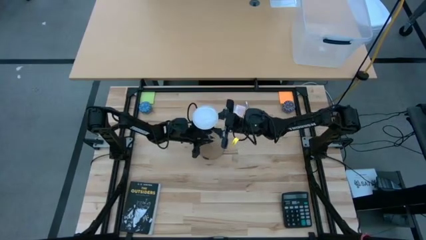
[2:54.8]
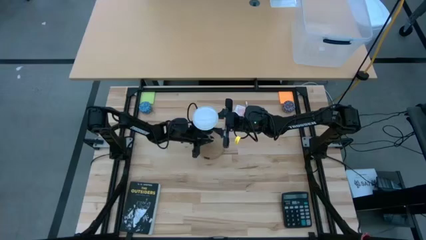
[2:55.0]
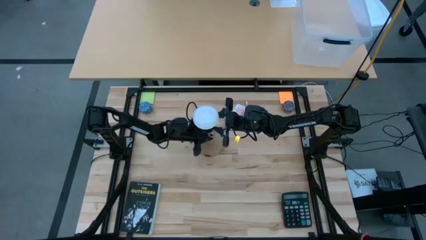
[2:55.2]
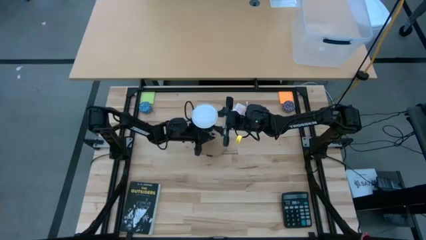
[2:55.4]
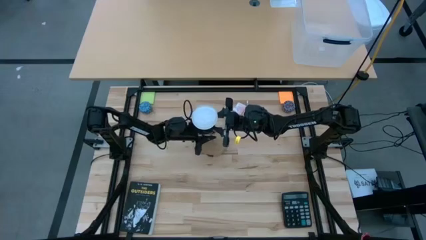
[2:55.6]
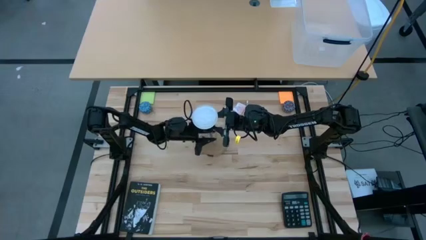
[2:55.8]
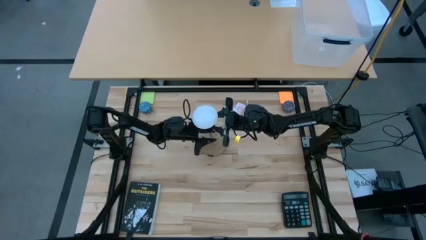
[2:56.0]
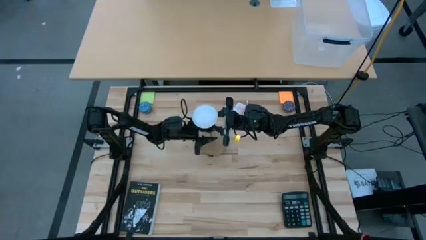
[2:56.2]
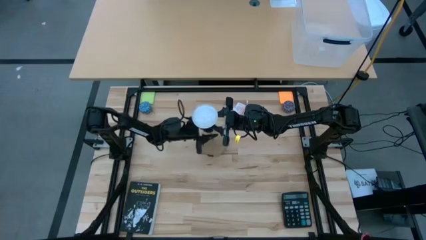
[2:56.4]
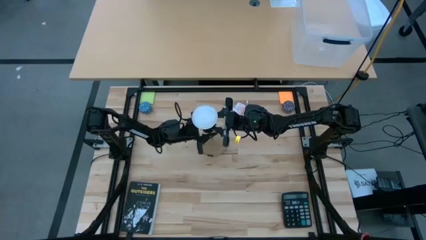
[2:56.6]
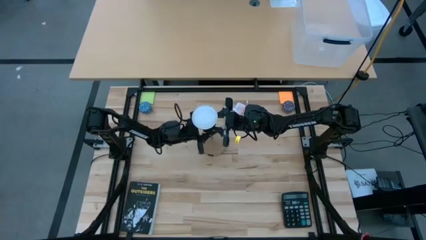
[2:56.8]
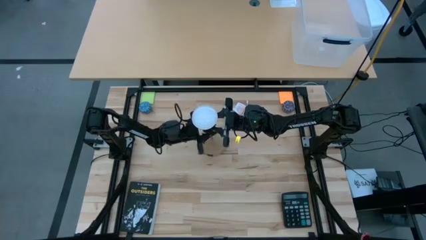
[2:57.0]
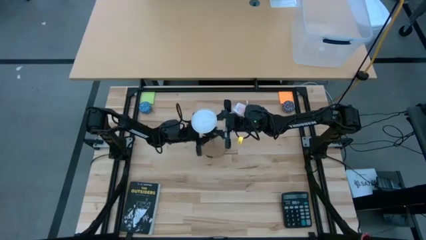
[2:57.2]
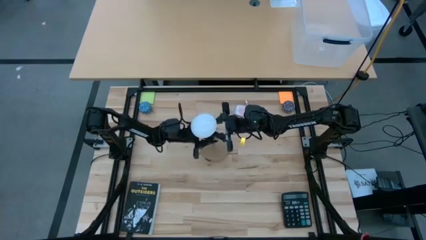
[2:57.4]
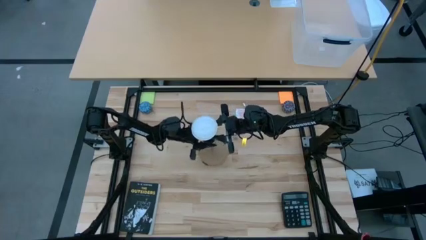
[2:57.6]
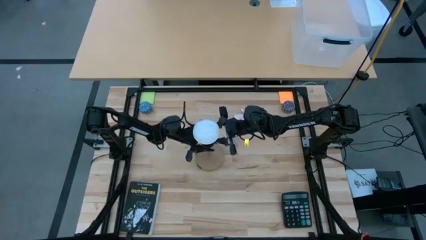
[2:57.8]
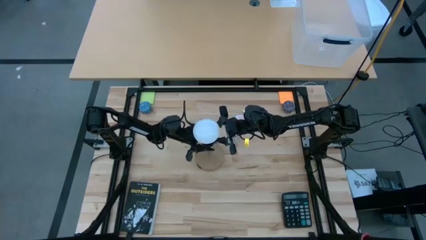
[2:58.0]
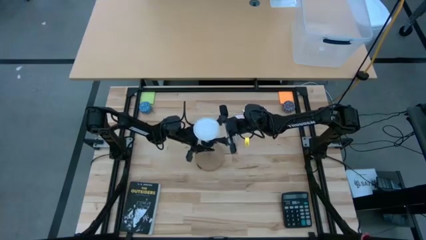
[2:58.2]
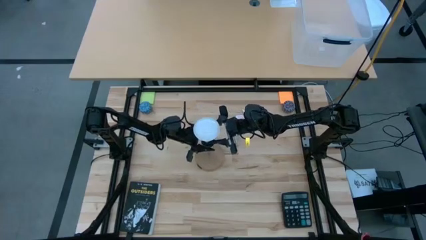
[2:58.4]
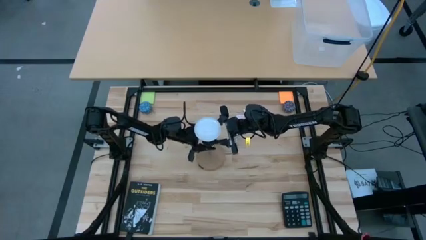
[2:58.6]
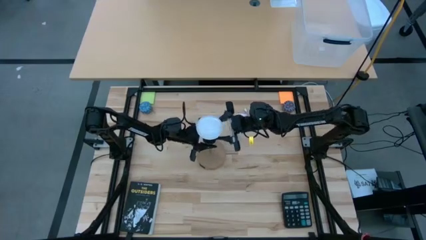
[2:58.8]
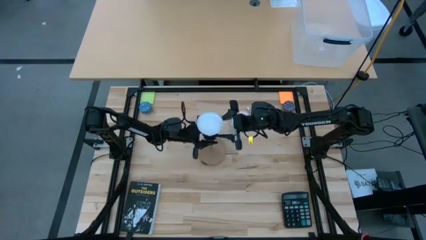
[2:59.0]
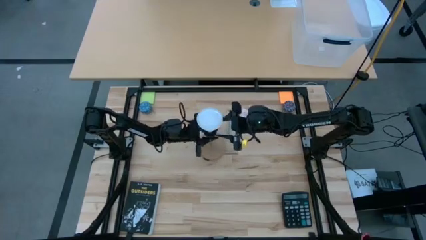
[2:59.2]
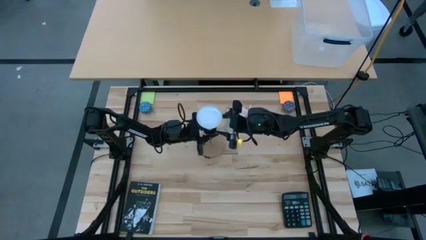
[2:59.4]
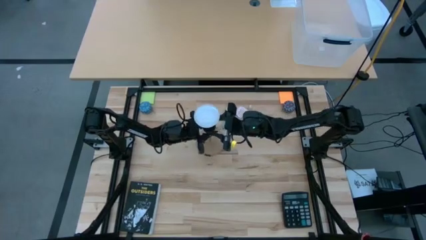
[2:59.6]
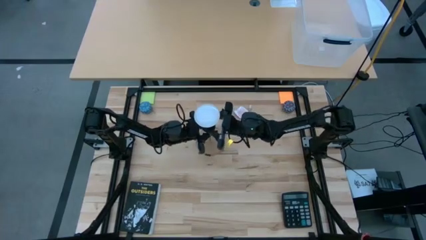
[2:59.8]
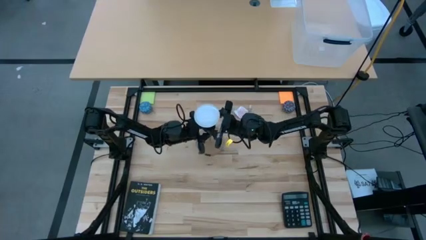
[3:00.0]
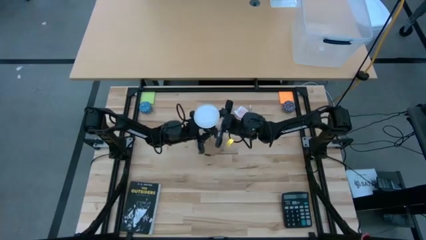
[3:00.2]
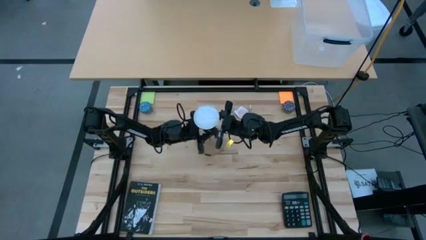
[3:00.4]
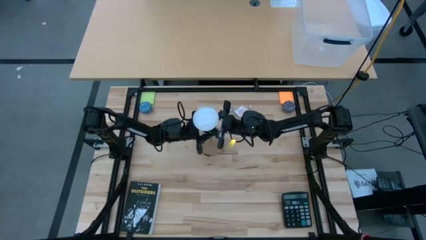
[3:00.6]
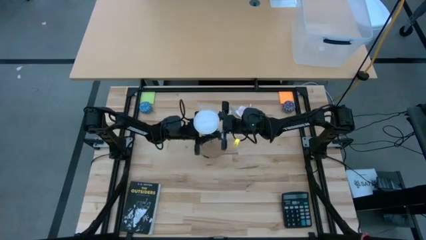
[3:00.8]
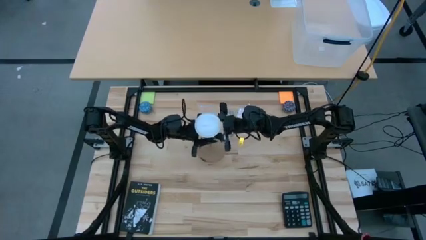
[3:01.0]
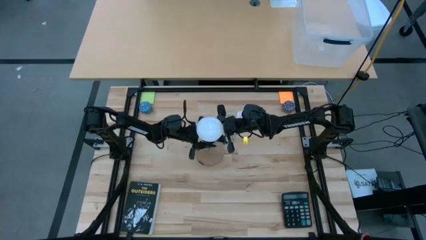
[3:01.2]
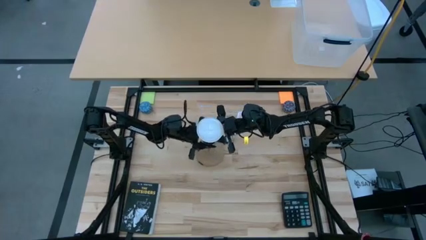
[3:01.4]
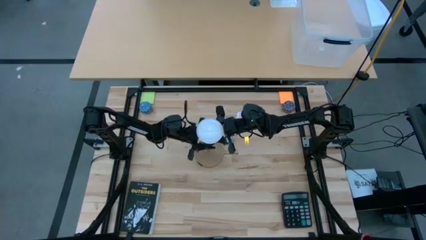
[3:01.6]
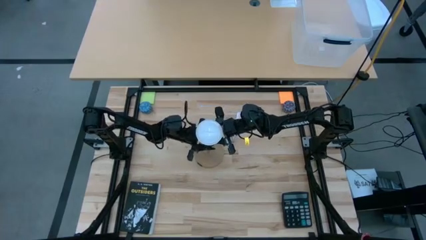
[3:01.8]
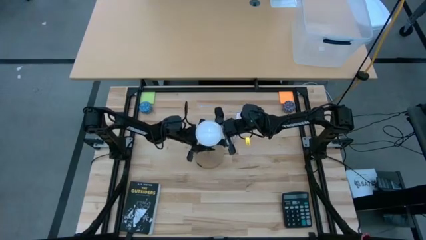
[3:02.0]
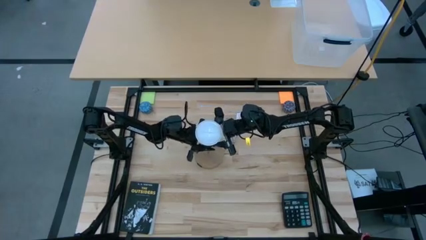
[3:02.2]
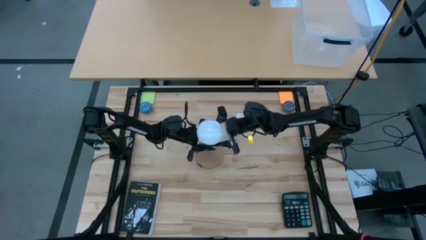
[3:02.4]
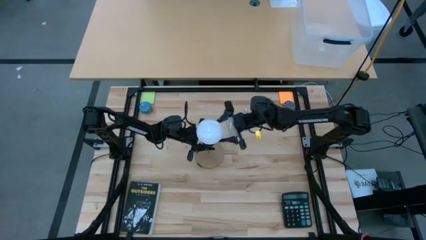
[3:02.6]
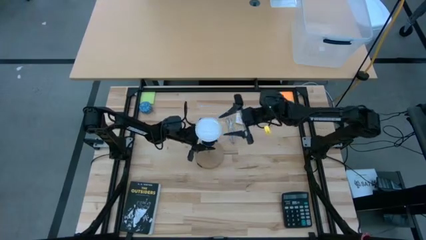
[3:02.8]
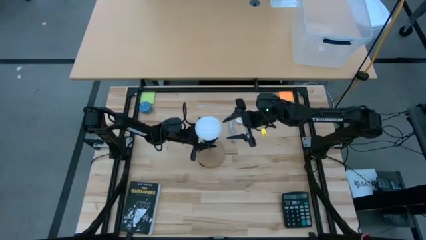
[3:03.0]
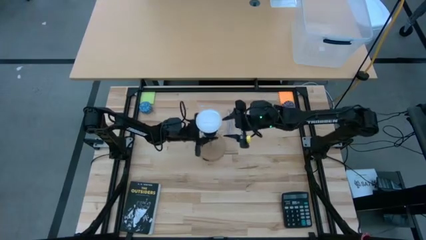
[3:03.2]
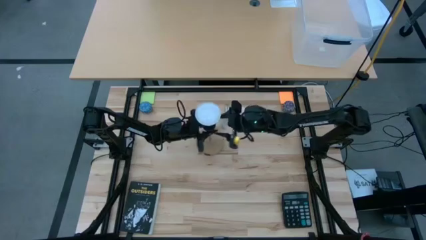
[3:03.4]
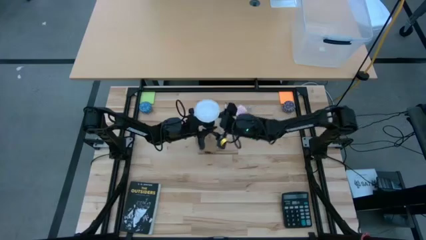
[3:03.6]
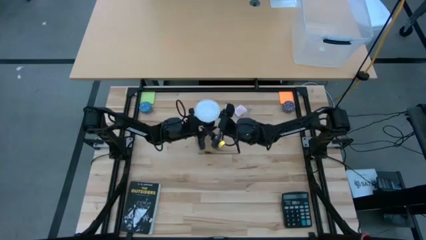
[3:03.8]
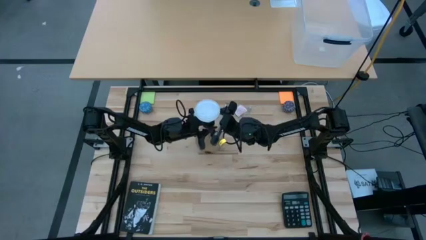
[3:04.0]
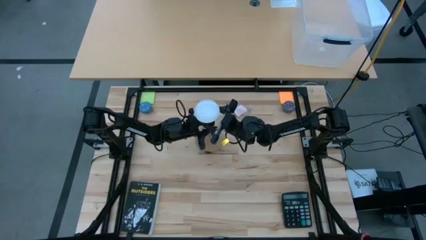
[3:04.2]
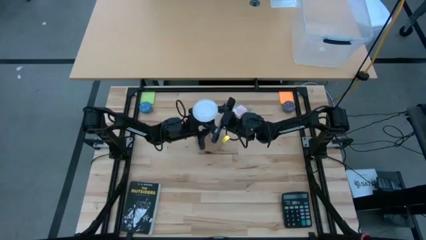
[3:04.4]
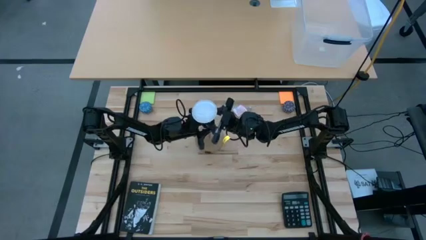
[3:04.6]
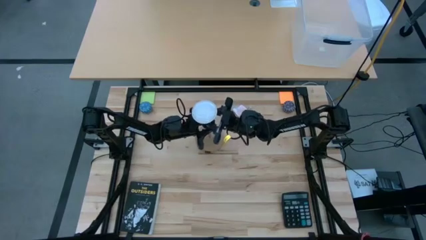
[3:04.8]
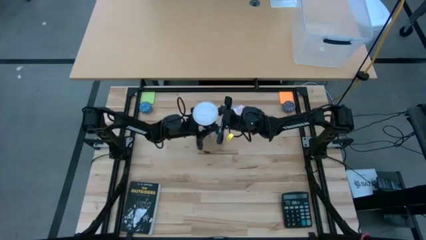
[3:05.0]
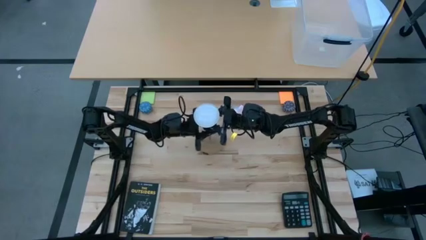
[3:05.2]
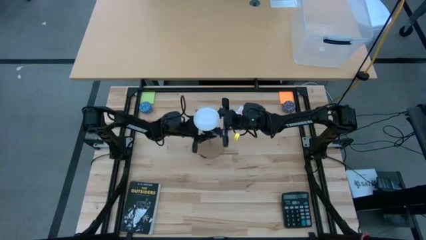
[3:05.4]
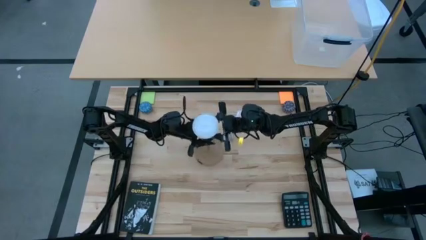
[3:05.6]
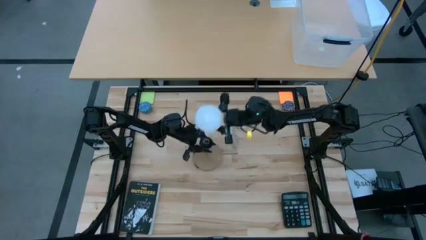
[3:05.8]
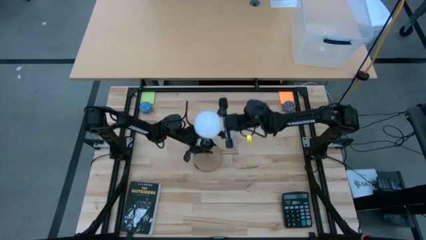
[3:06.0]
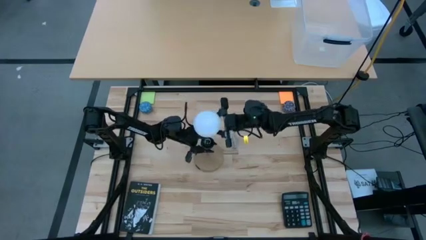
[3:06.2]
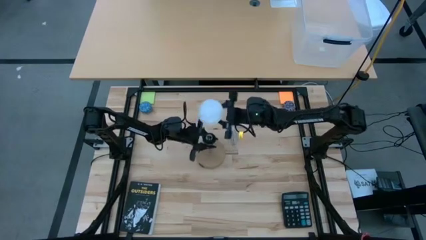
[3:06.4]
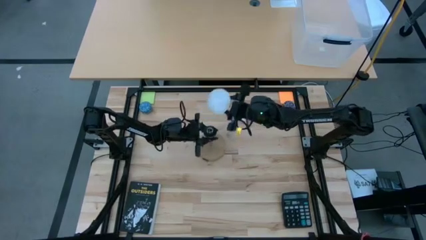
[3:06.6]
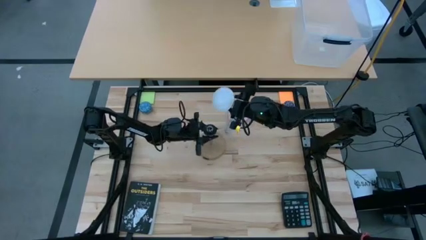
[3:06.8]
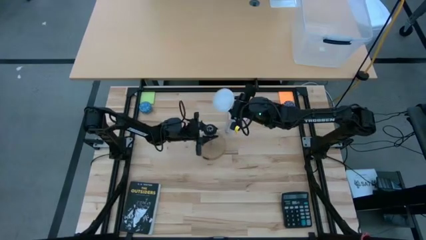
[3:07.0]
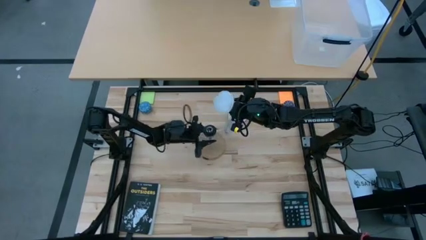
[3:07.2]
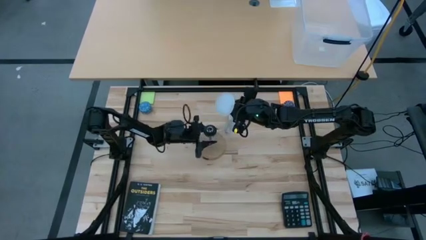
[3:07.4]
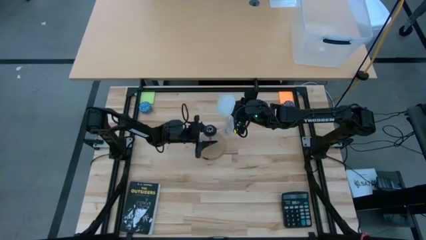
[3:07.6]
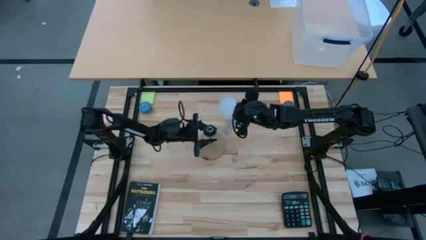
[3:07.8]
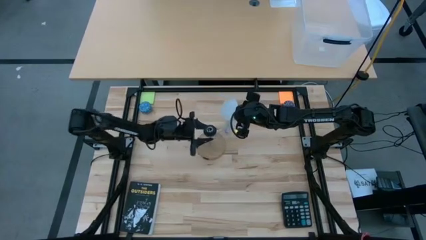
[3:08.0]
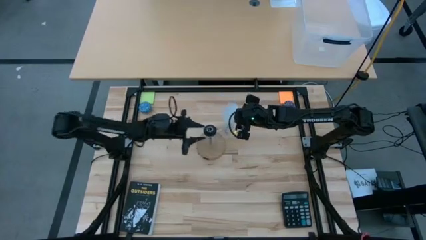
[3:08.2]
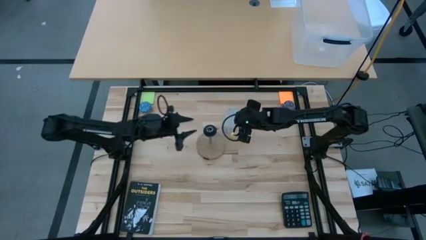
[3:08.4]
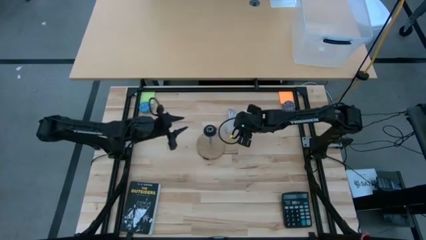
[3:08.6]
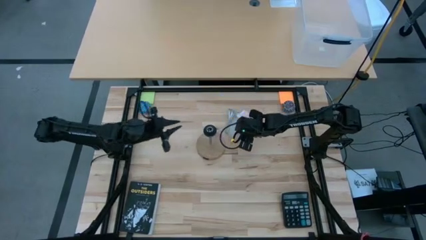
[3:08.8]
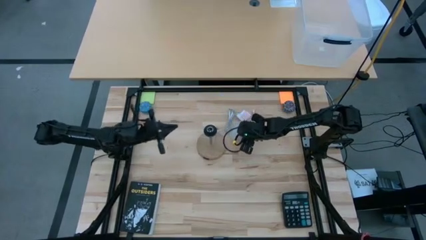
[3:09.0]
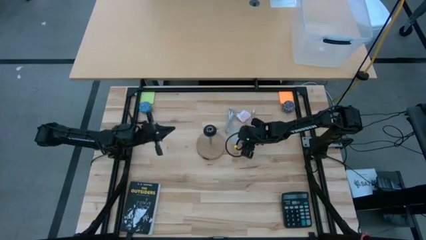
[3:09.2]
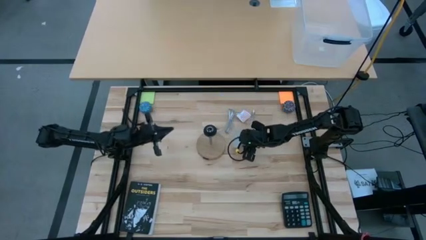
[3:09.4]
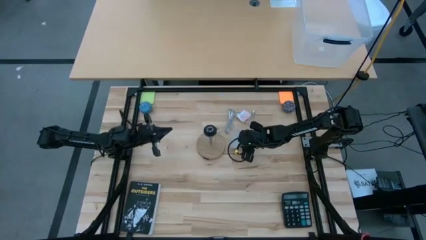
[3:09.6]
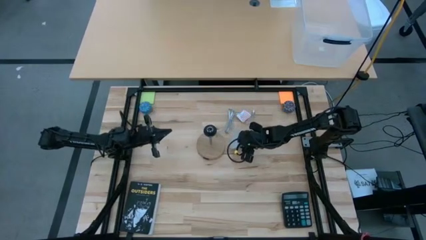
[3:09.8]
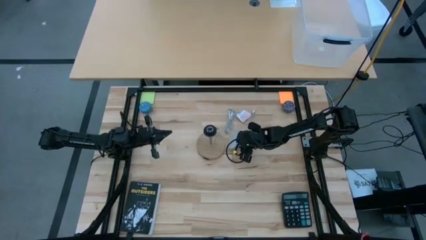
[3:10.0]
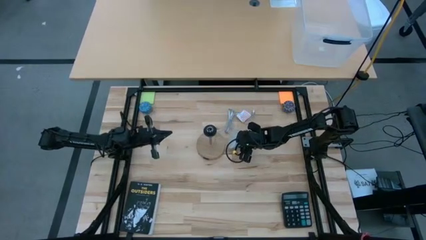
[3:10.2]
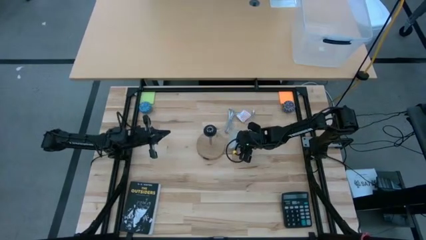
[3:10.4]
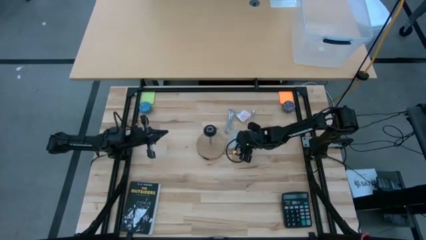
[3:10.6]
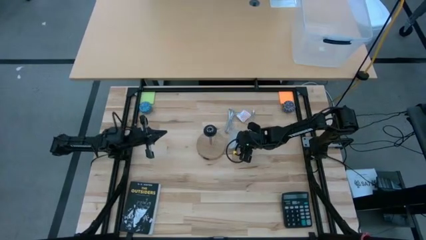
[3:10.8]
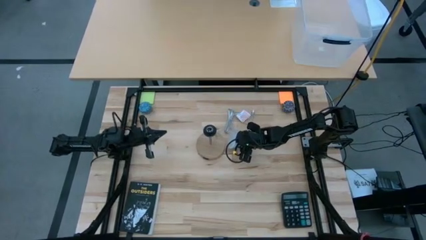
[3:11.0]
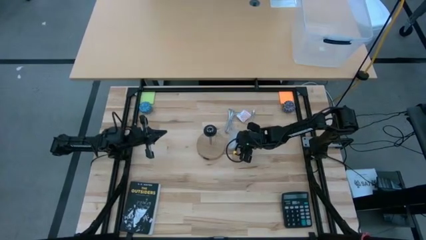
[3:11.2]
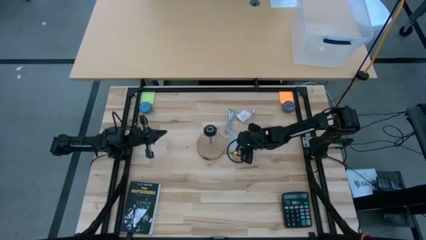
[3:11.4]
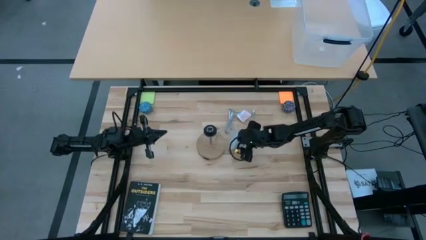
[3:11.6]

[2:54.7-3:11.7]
Task: Screw lightbulb
Remove the lightbulb from the lamp
